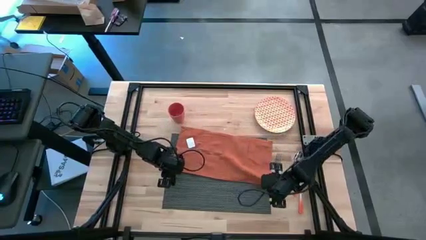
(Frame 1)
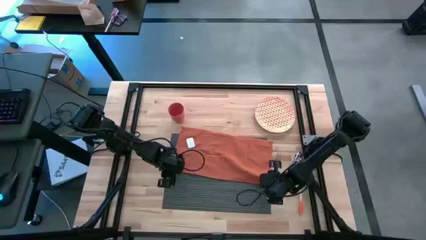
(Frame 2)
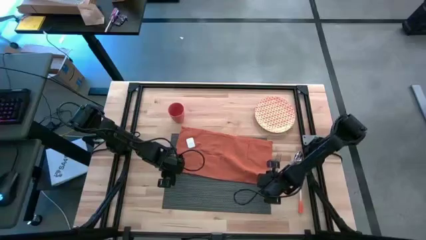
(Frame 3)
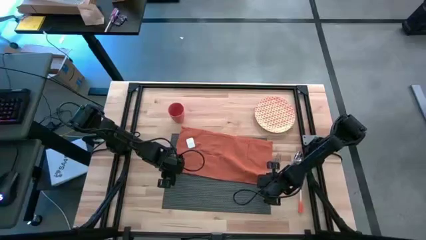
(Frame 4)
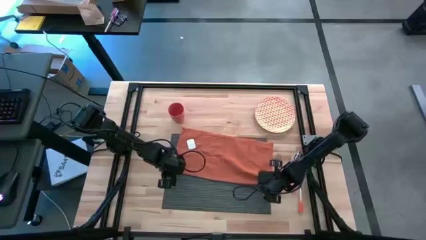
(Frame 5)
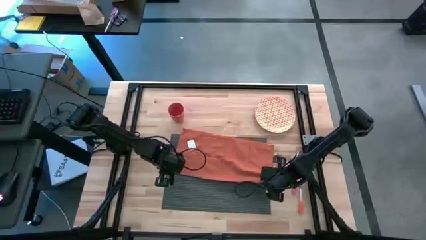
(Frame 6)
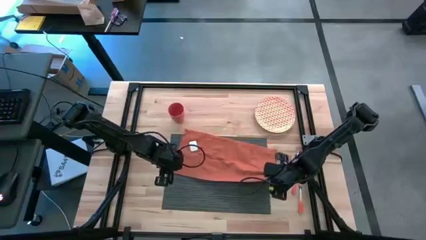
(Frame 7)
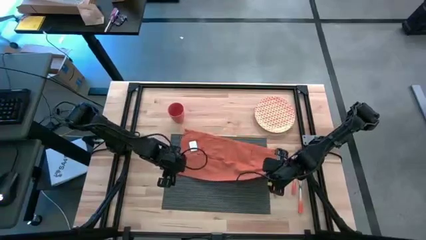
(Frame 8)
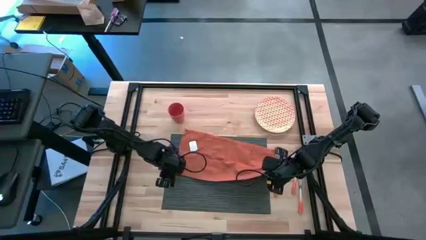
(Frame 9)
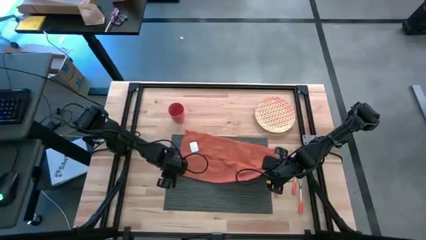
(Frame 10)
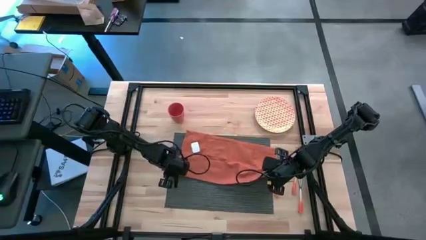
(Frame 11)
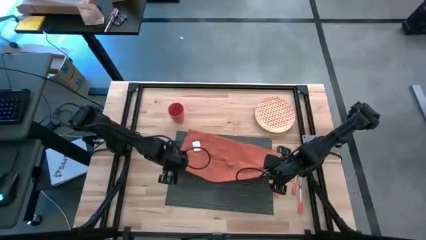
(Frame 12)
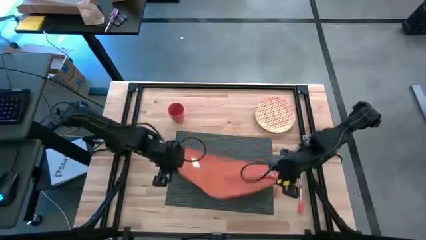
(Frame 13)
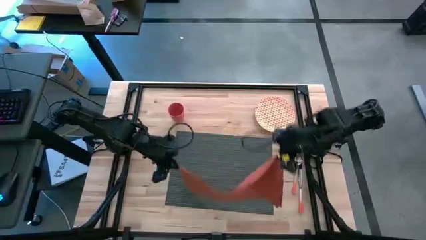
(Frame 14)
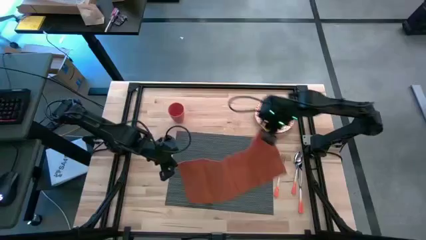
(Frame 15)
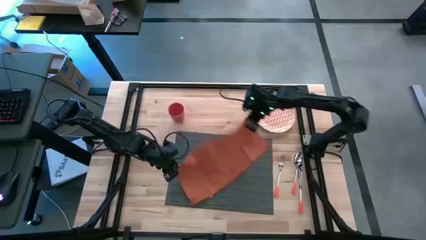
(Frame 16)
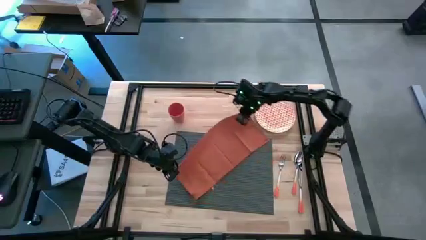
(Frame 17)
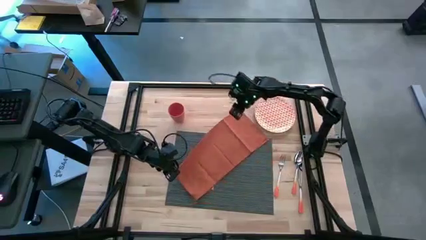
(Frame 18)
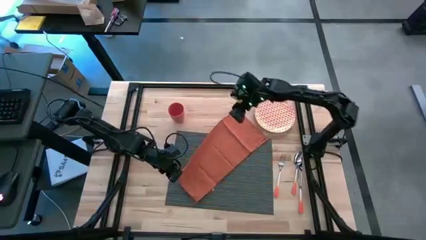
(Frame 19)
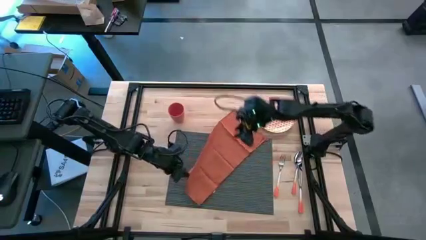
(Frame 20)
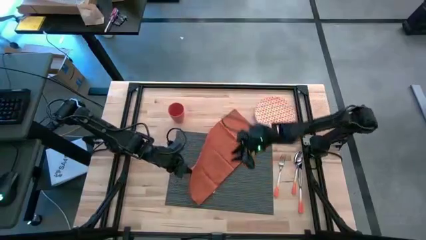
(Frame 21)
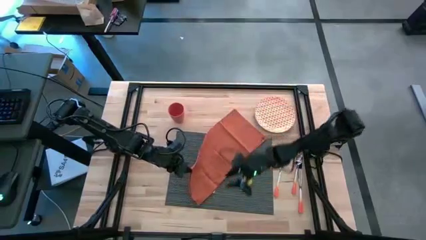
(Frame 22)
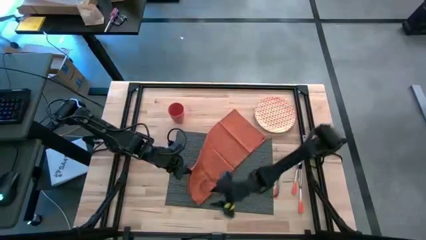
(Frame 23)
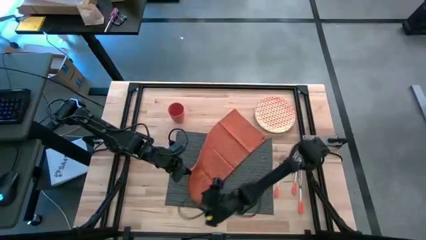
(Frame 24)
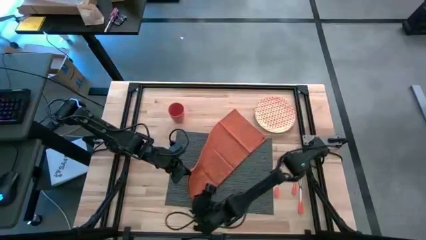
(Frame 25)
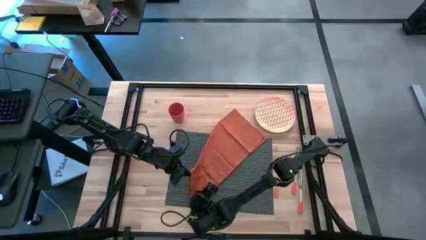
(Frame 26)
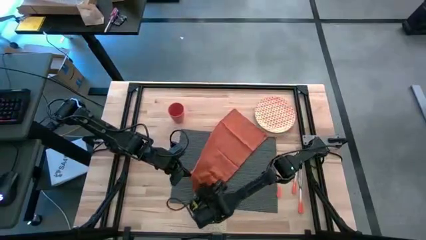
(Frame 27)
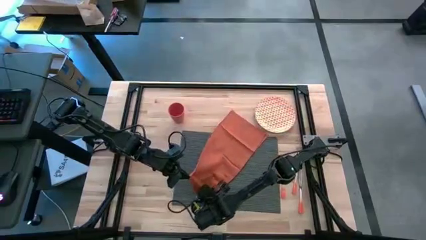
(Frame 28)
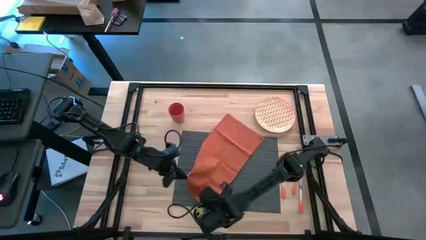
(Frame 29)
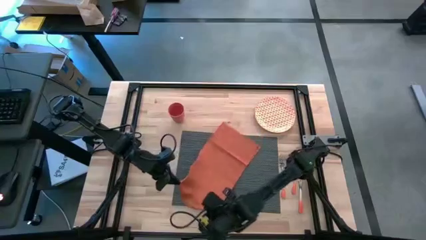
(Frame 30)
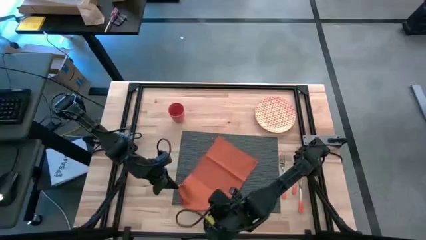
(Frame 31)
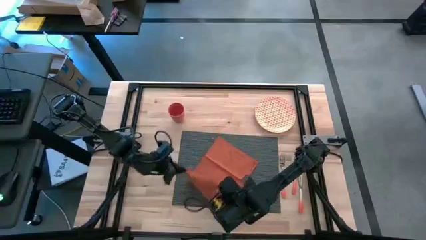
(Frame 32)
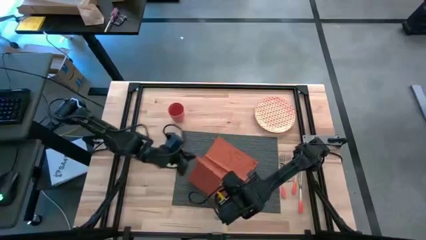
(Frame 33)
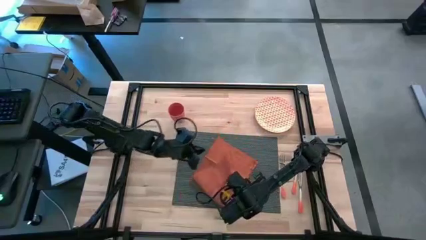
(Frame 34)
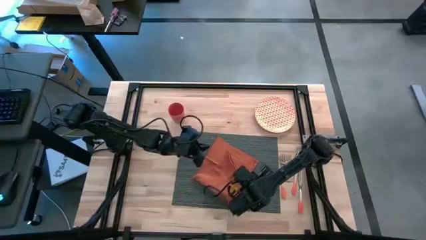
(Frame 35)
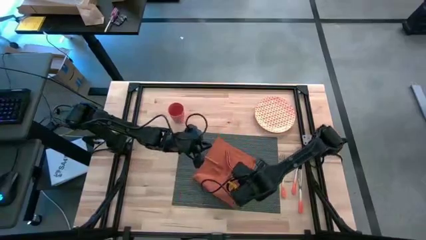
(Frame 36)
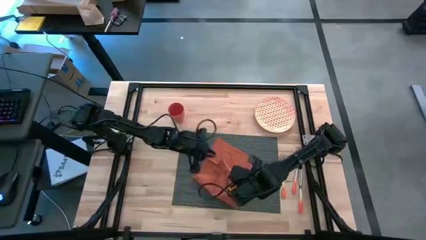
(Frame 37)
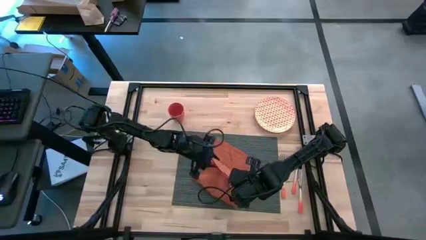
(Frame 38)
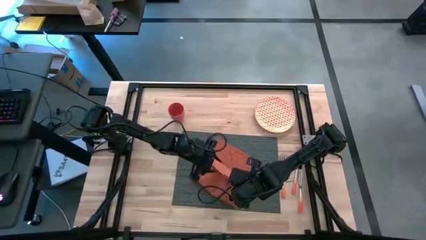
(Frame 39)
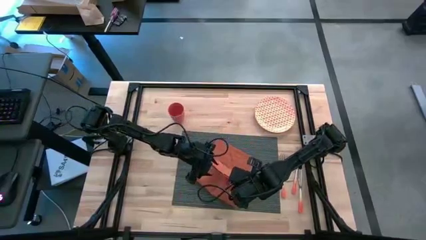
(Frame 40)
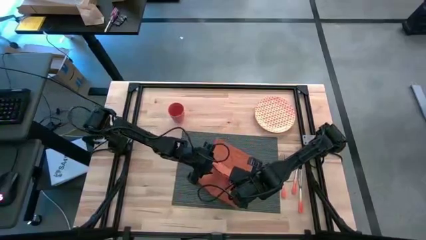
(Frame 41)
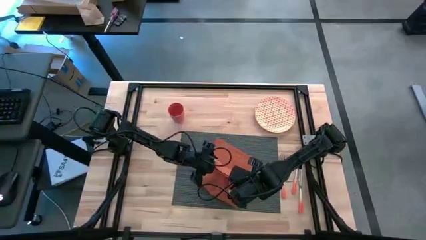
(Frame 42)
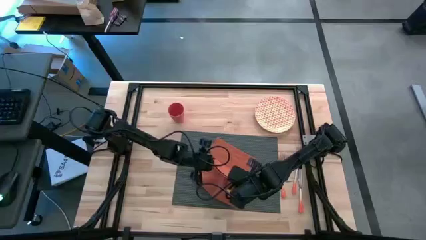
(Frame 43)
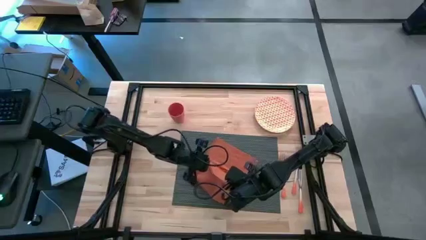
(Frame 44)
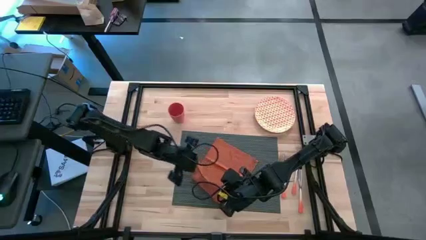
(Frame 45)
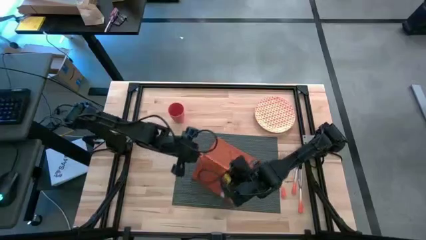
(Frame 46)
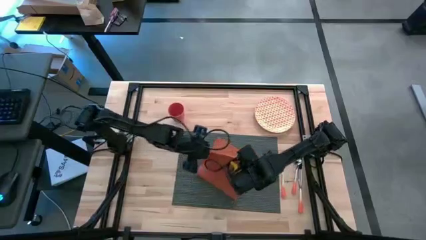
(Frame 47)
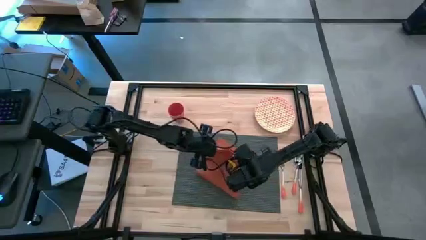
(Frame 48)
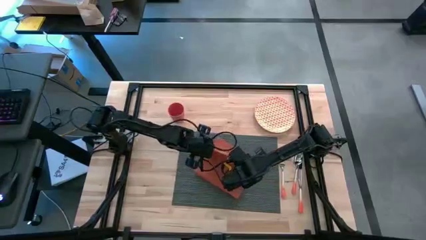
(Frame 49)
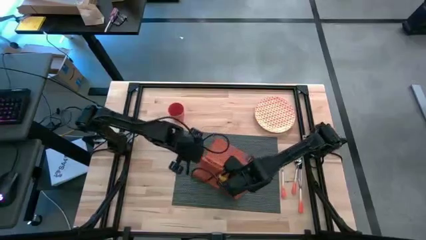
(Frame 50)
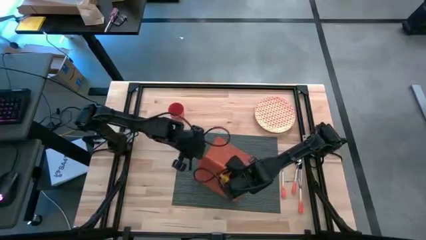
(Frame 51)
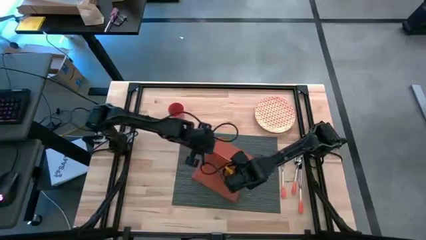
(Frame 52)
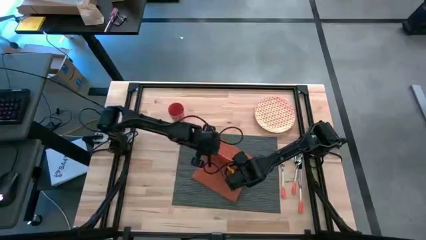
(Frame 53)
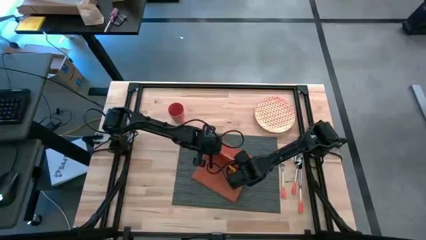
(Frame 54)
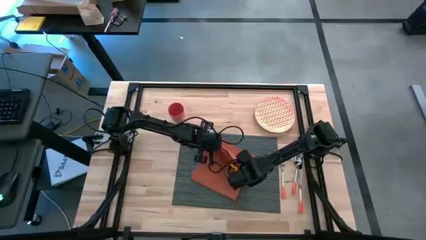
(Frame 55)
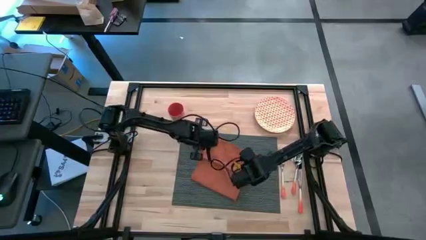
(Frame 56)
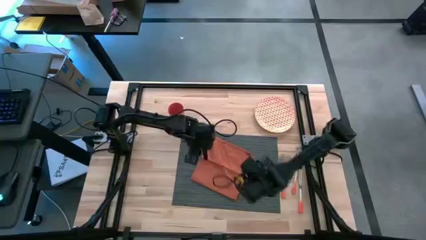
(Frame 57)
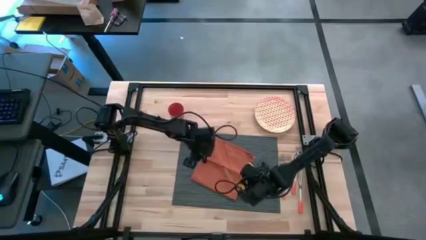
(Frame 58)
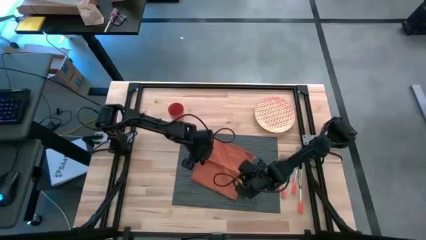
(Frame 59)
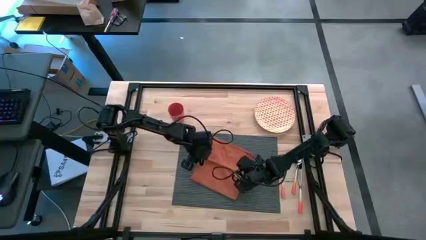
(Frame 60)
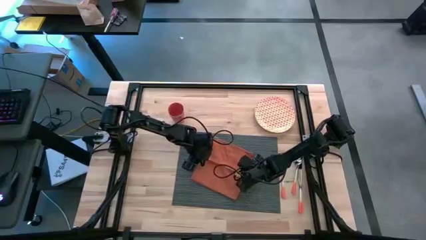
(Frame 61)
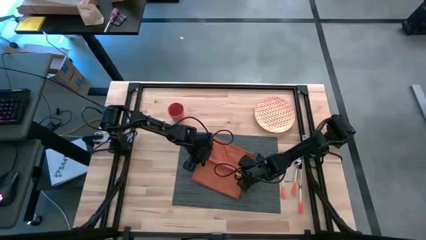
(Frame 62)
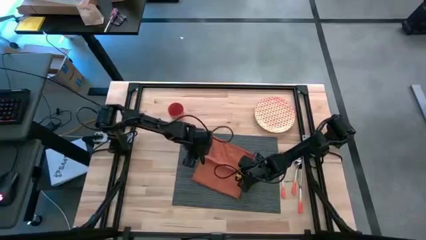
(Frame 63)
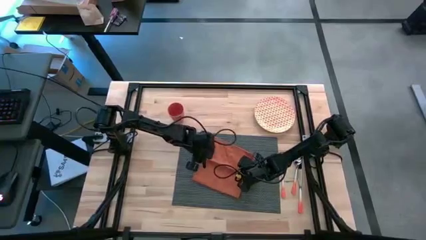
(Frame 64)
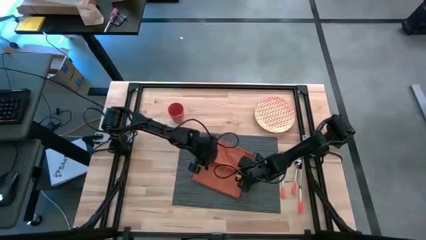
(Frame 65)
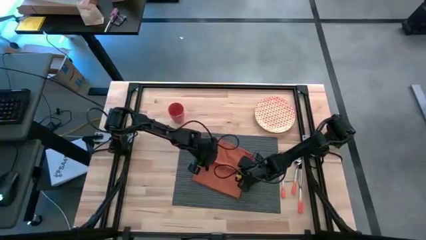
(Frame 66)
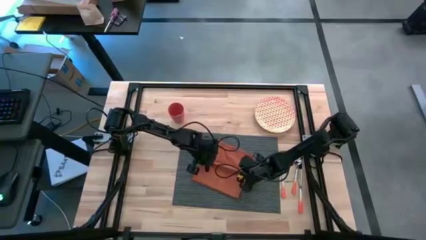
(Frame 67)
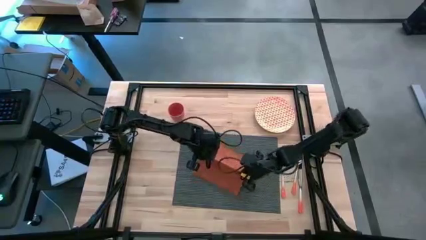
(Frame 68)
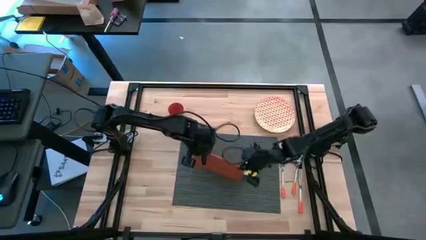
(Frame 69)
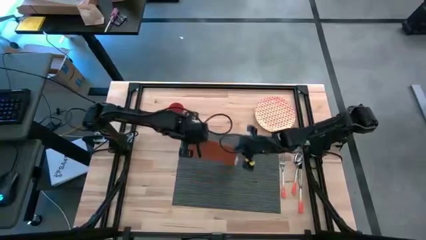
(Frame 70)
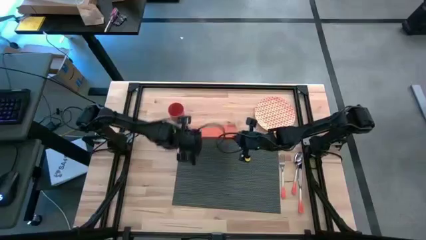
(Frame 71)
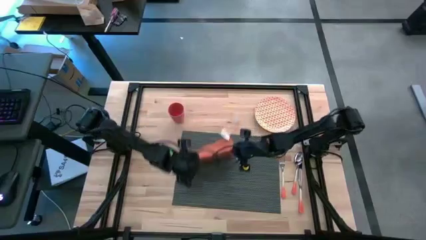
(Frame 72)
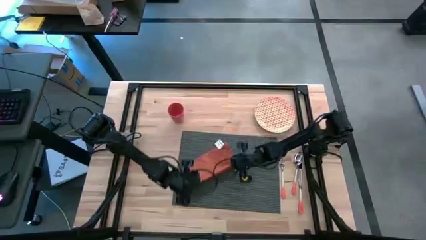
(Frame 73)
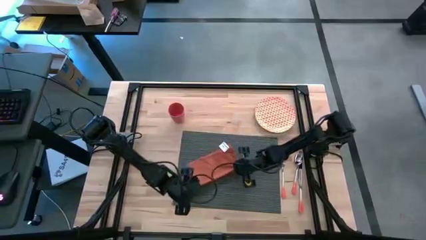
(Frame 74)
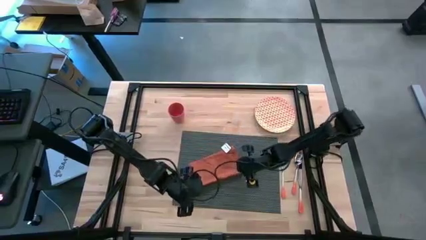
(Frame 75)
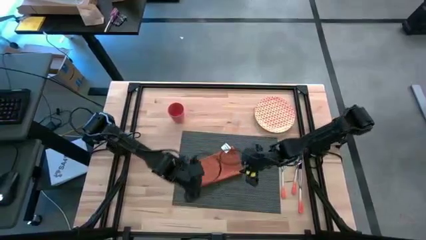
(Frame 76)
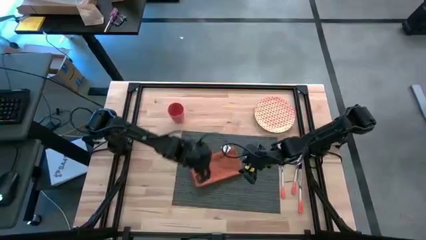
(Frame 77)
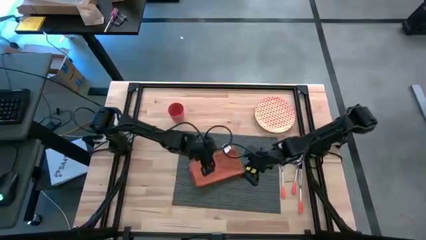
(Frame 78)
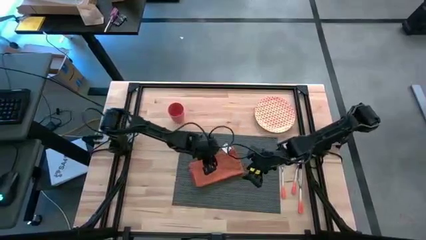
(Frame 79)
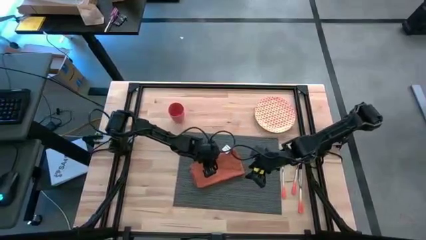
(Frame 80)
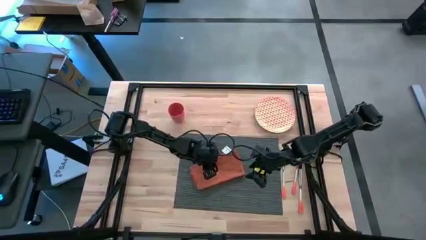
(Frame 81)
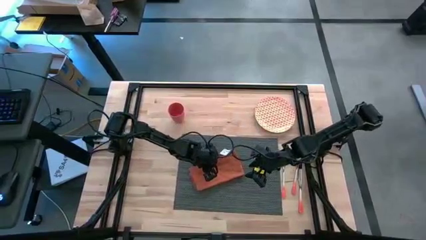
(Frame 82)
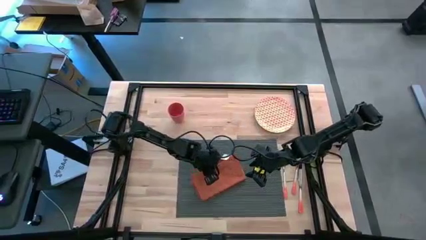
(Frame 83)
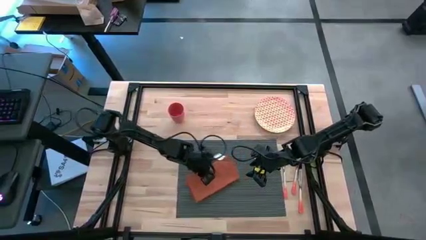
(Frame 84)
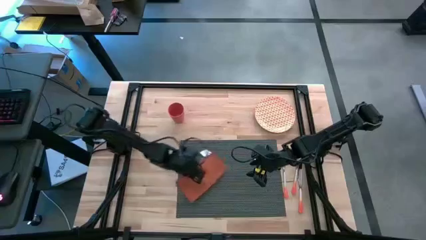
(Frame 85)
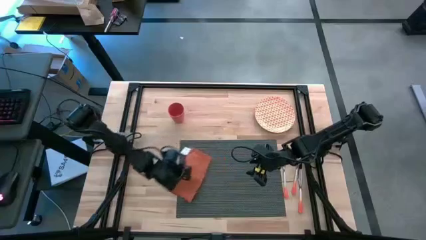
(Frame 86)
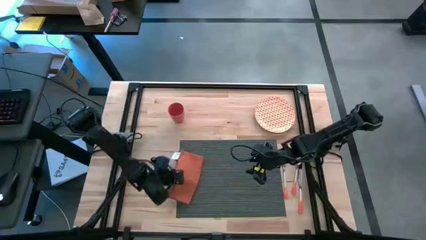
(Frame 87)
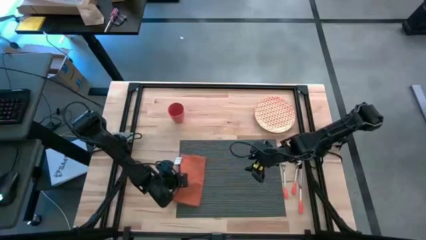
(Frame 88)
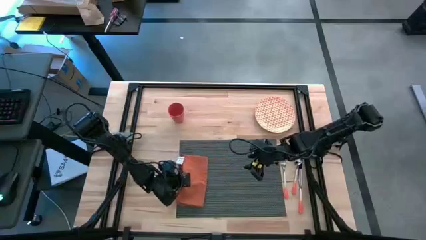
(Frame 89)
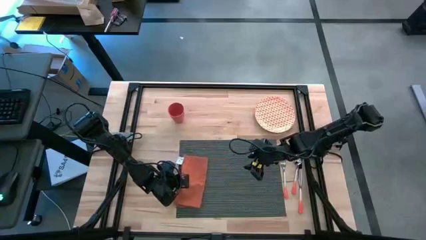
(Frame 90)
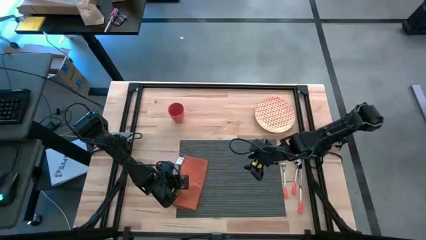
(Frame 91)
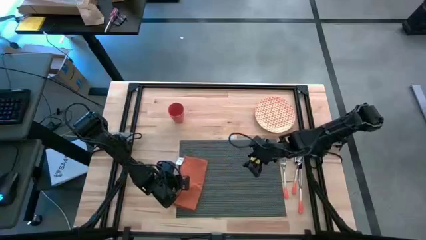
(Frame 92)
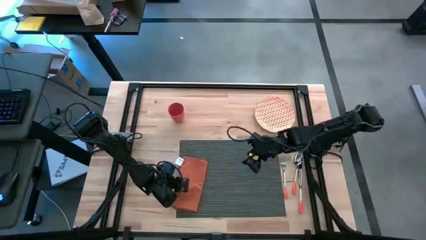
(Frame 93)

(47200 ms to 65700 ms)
Task: Set table place
Fold the orange table napkin
